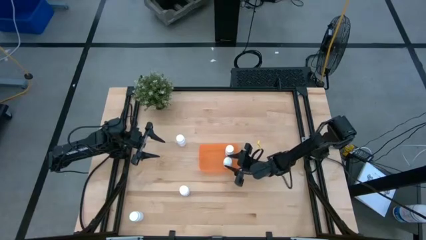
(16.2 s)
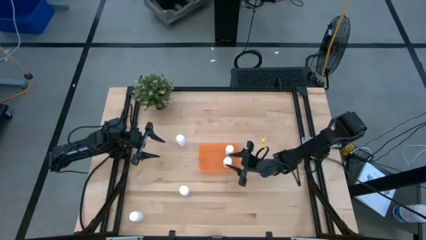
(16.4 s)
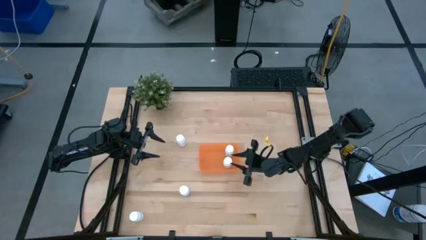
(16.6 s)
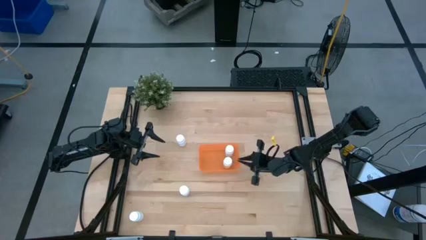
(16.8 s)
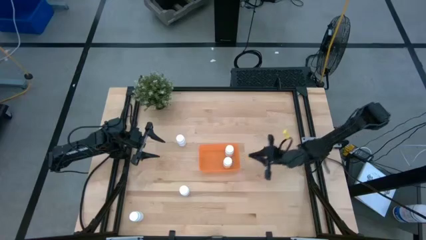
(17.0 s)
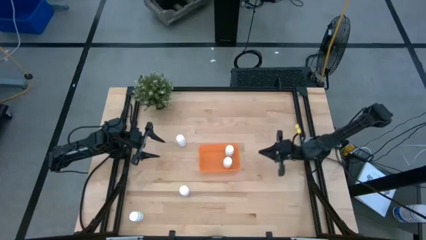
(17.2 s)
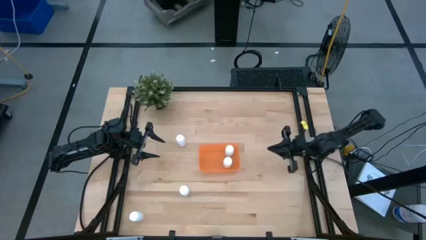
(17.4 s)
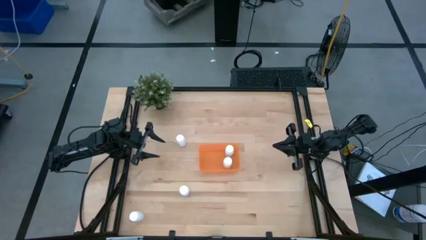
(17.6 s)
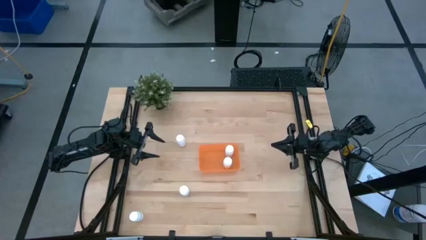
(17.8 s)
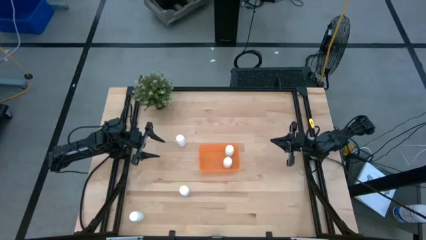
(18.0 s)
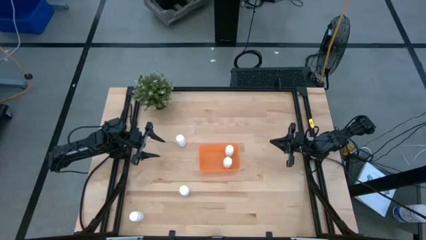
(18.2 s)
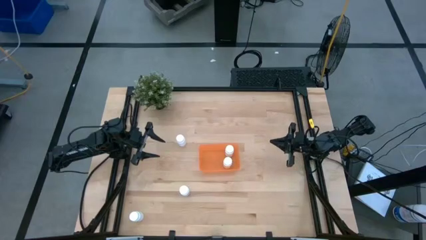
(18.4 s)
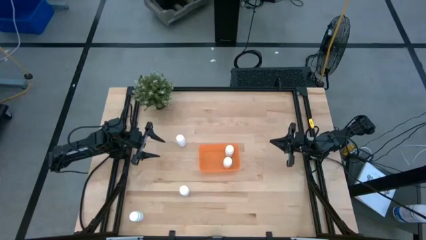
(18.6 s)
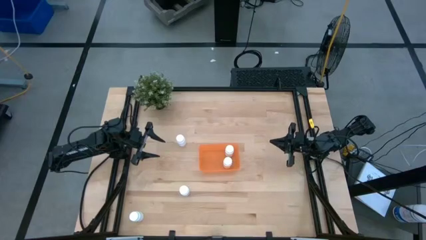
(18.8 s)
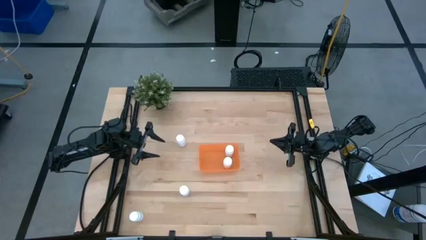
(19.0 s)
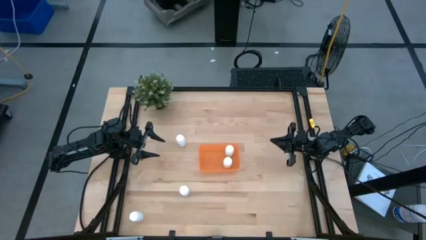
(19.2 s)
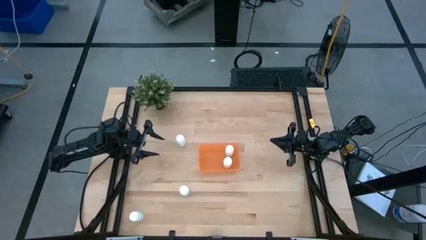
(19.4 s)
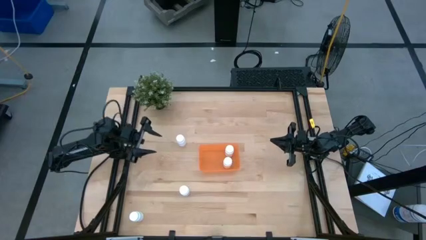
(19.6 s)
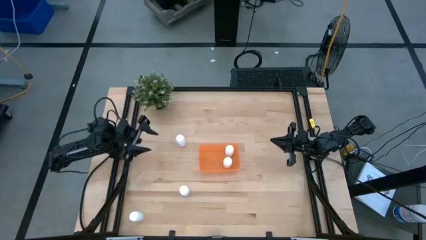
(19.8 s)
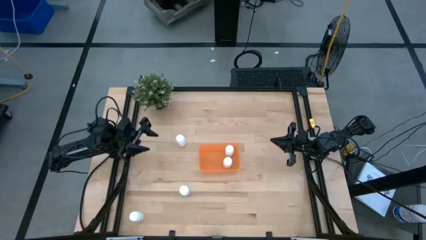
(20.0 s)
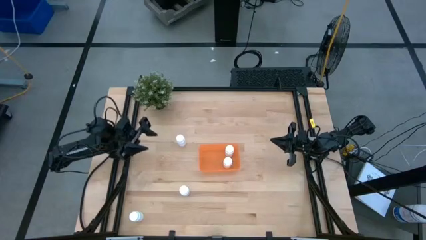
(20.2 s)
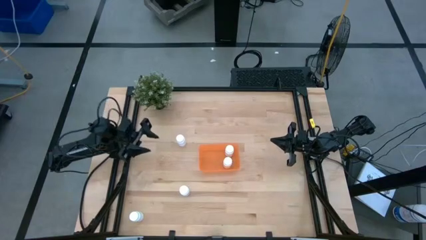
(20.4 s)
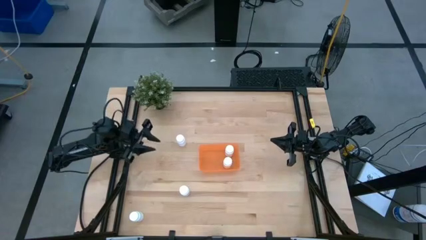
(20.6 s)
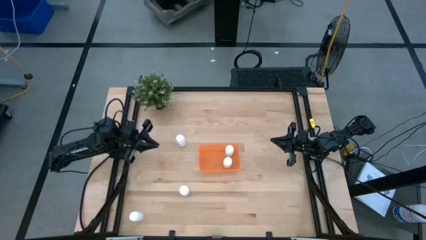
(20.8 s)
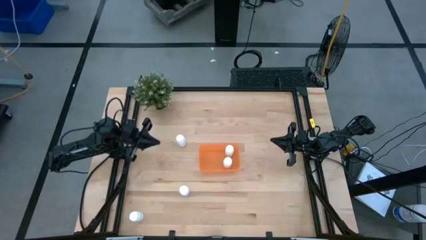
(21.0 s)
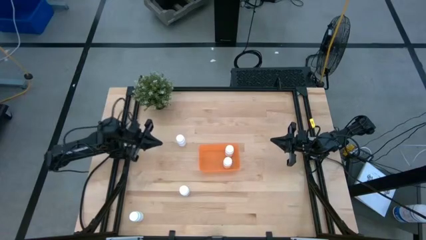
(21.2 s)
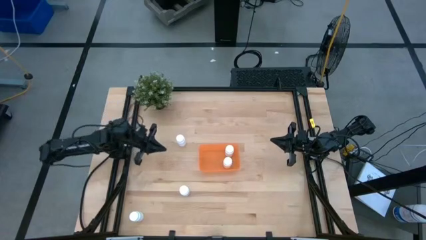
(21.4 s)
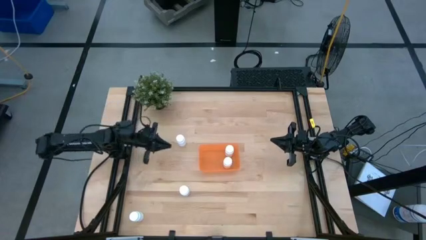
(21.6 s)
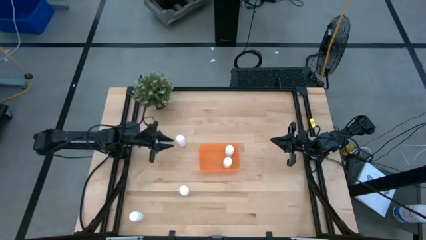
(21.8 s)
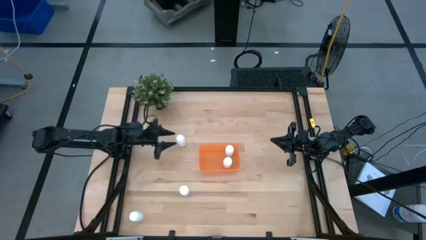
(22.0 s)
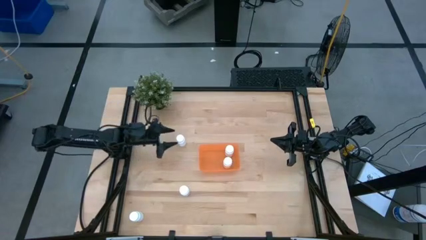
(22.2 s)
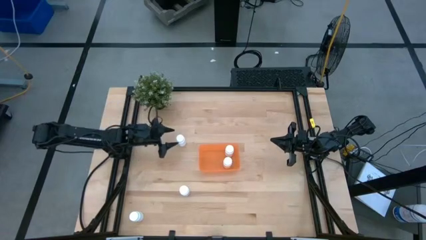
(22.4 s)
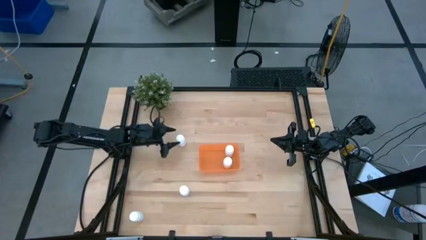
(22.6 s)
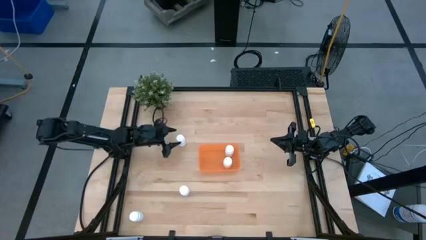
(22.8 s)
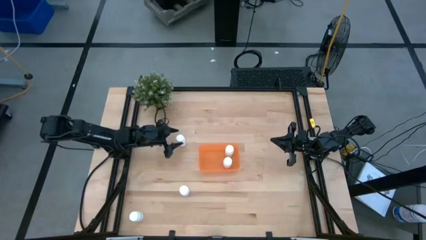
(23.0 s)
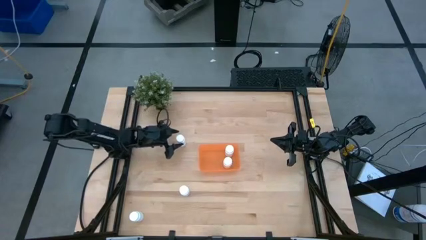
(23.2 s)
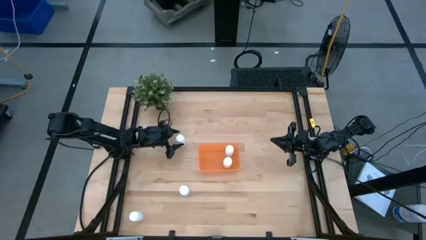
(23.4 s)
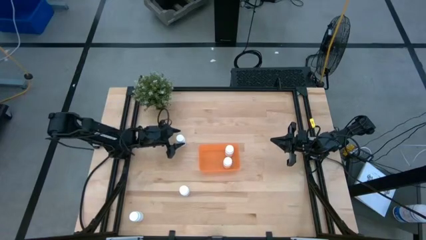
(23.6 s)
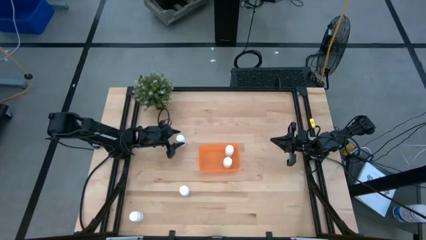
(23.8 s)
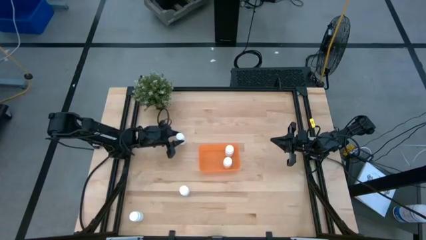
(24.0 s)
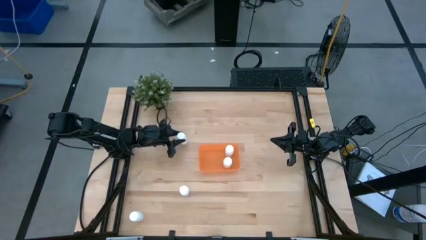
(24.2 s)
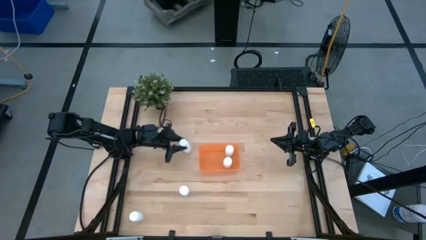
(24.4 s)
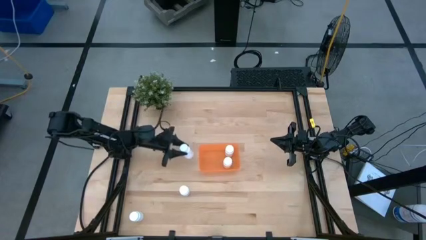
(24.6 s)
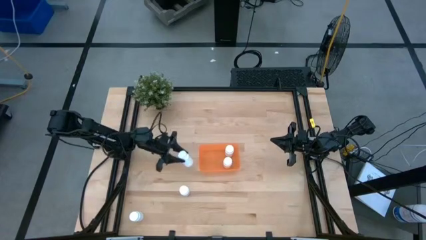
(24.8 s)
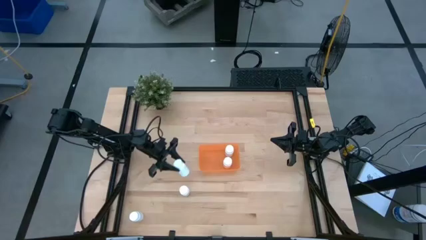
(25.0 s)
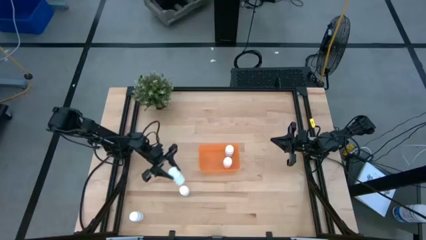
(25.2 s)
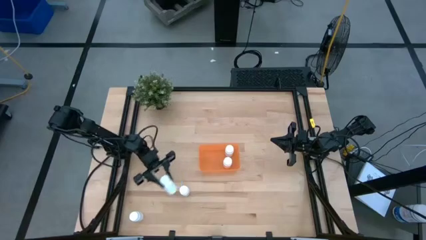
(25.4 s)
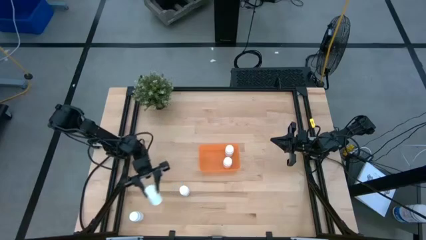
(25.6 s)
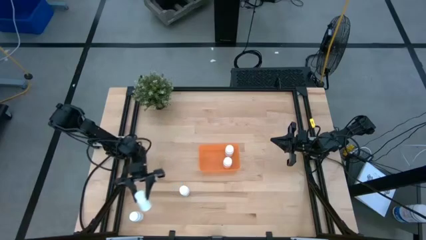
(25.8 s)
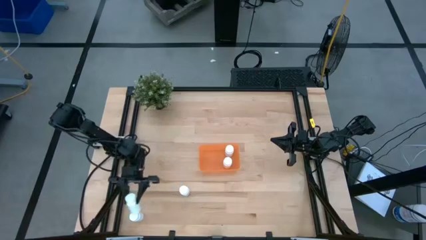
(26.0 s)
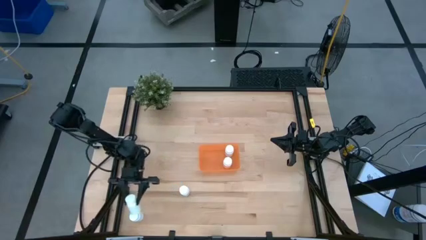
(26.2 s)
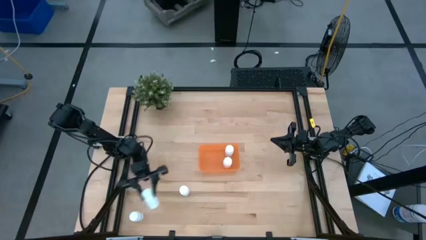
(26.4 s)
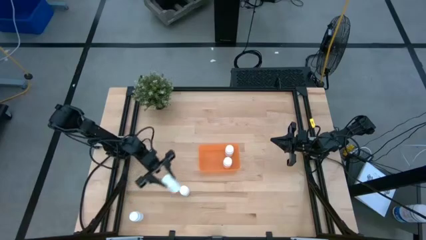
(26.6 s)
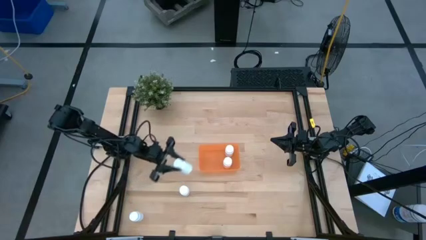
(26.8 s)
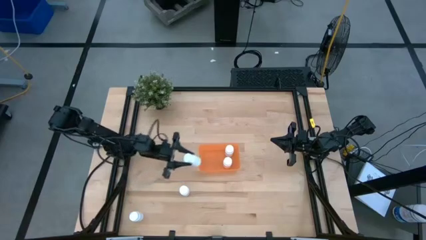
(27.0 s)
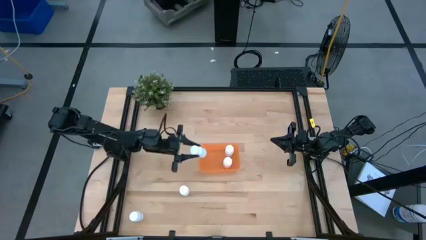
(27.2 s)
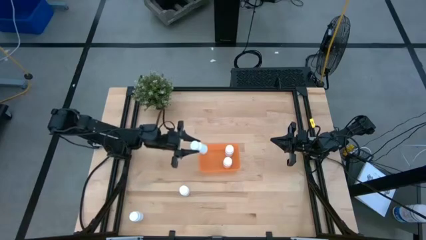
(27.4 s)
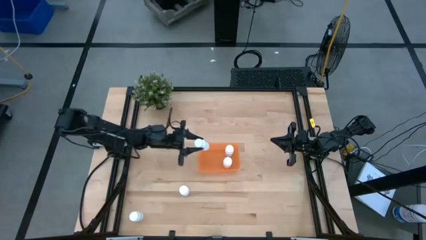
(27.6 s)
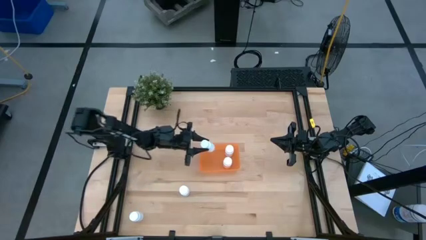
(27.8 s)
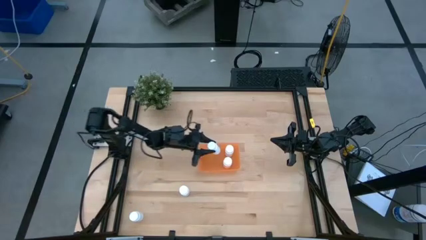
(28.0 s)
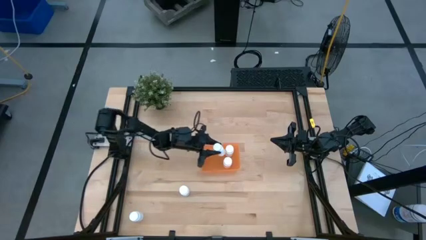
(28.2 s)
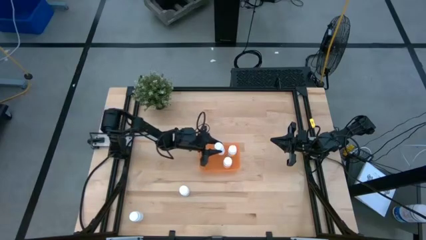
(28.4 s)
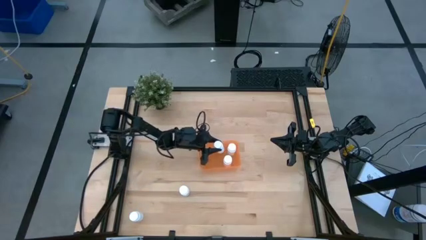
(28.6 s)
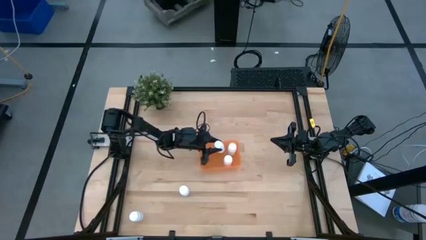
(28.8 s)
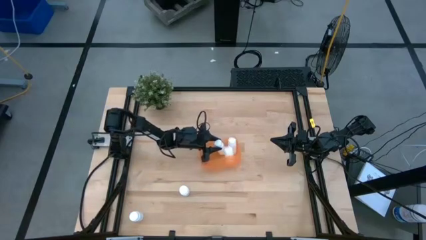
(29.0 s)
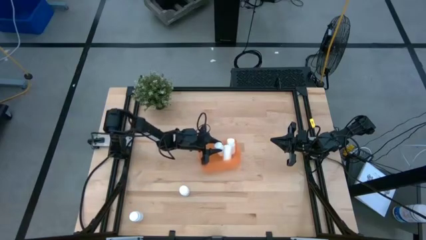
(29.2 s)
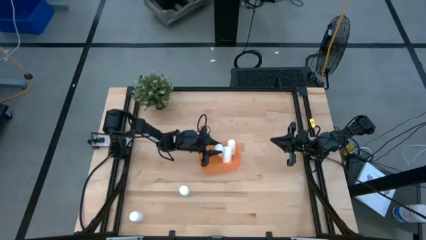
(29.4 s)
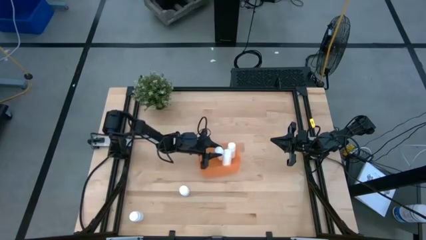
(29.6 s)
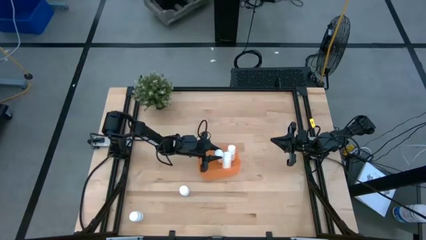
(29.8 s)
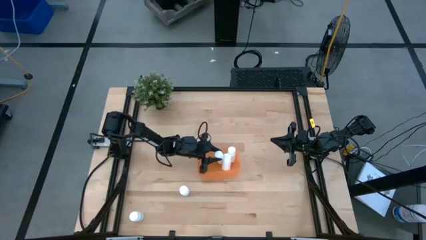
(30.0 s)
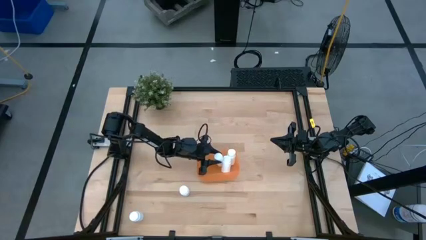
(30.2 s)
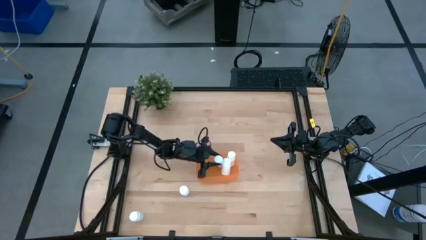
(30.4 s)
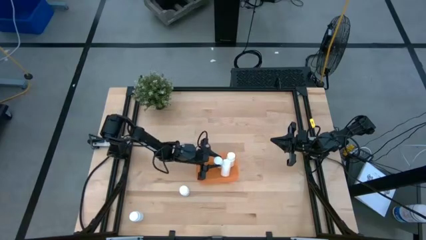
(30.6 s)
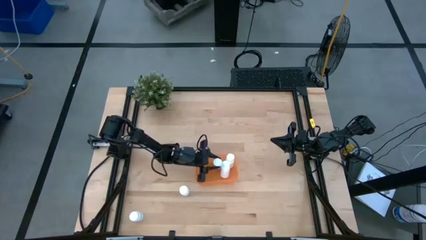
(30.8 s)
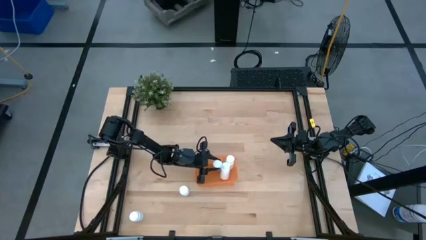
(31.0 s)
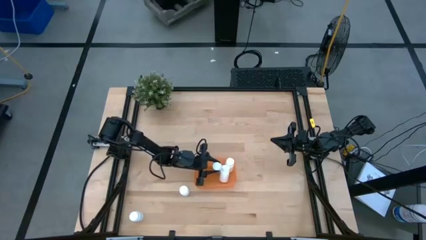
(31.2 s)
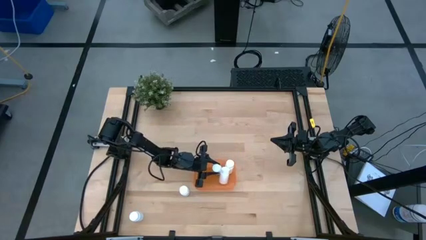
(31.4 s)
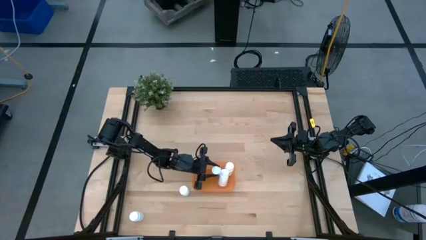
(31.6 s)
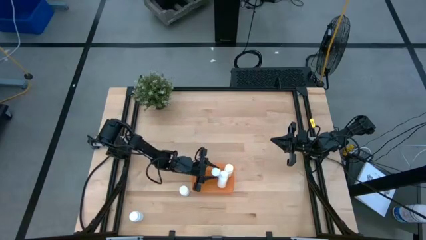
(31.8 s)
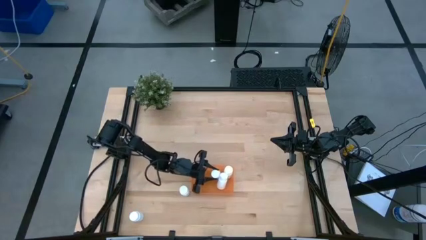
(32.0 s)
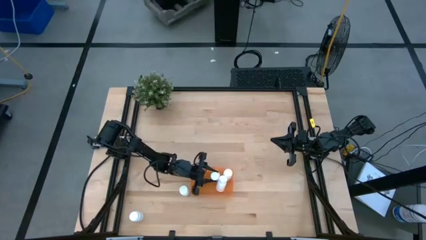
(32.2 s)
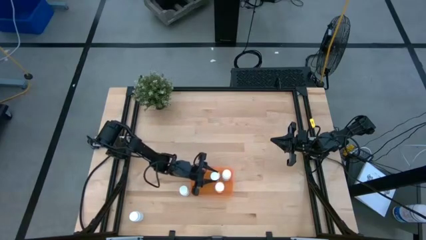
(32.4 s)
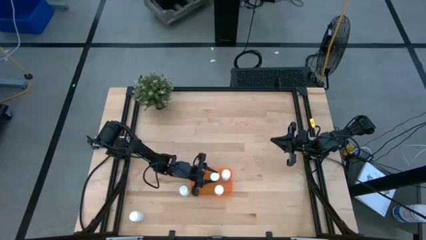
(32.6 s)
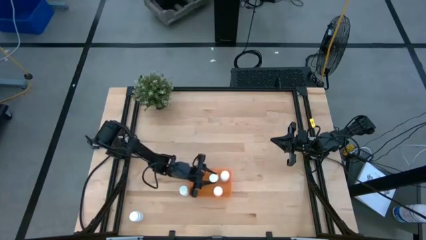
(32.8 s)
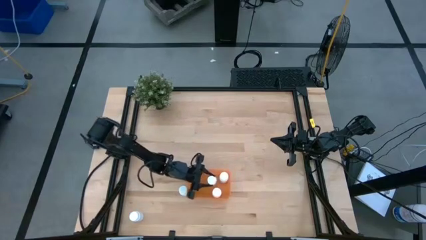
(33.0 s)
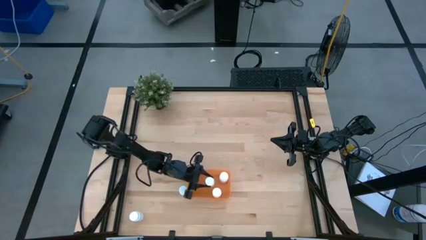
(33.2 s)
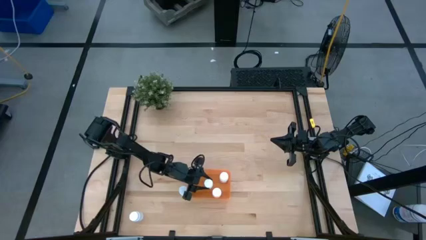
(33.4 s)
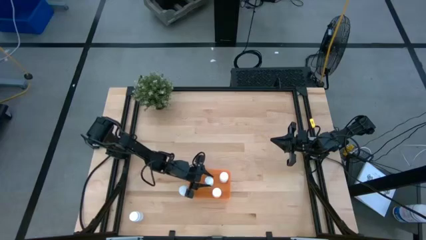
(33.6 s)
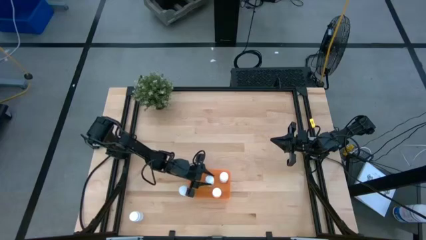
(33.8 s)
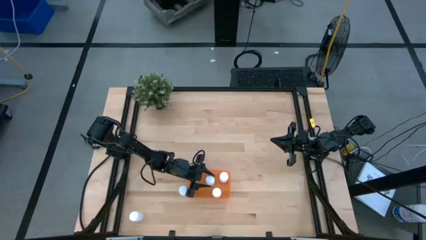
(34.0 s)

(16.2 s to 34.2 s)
Task: Pick and place pill bottles into a basket
Put the white medicine bottle into the orange bin
